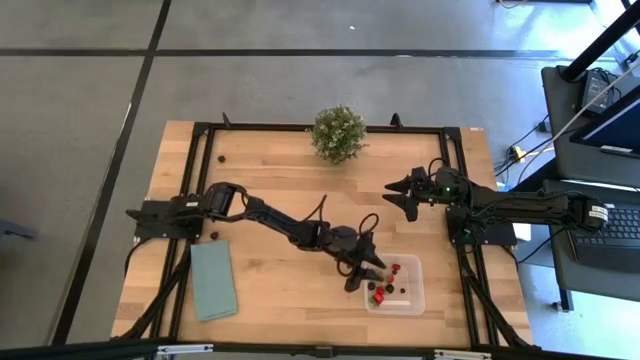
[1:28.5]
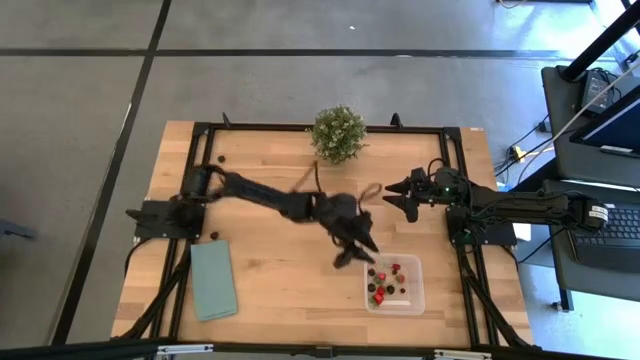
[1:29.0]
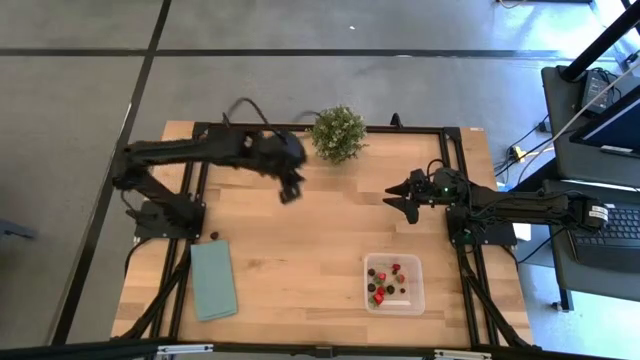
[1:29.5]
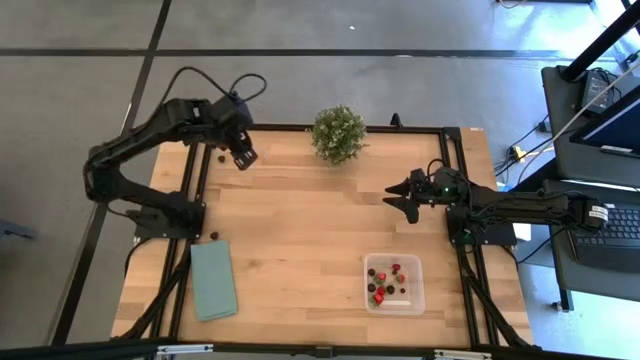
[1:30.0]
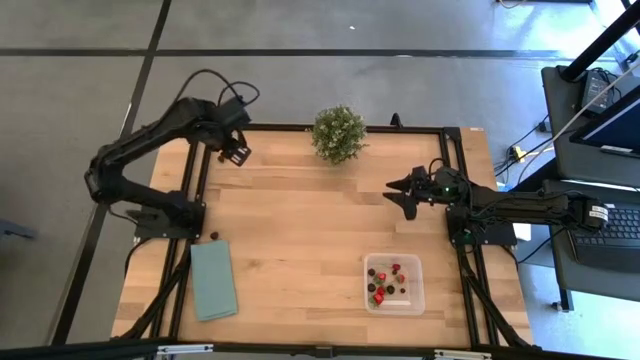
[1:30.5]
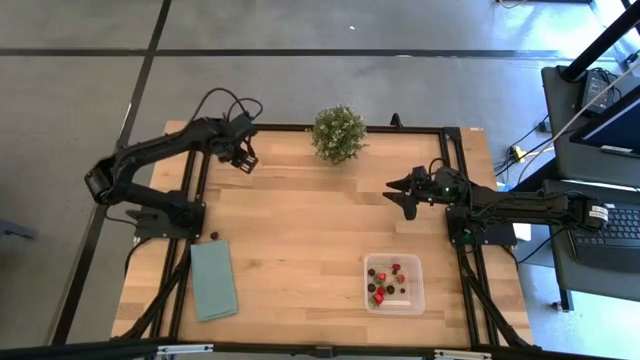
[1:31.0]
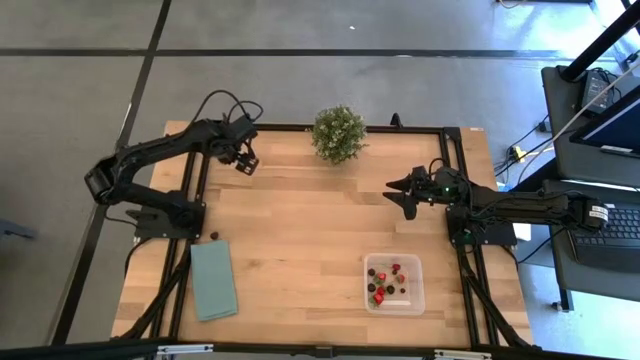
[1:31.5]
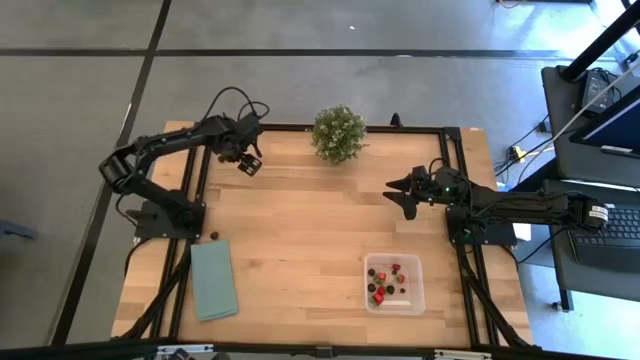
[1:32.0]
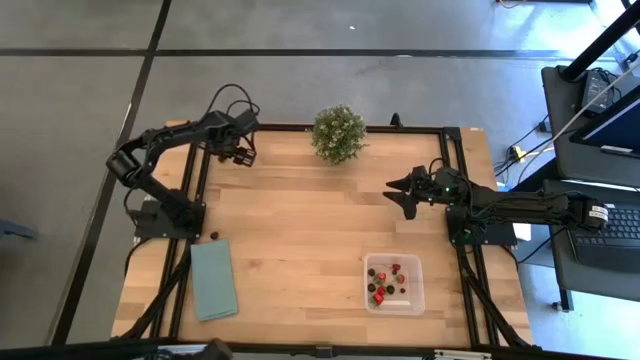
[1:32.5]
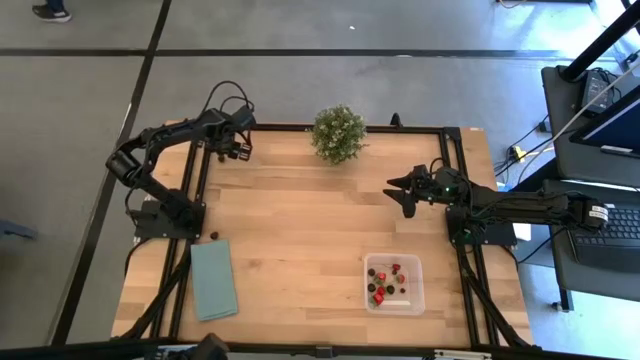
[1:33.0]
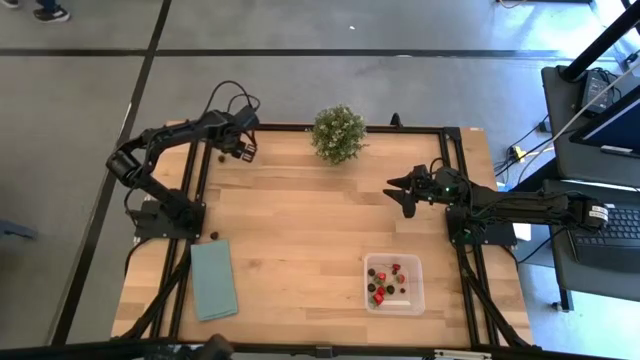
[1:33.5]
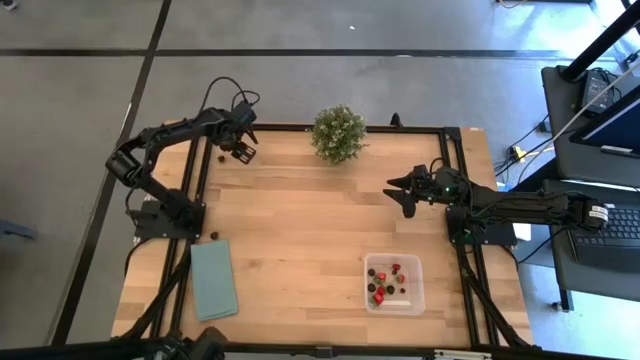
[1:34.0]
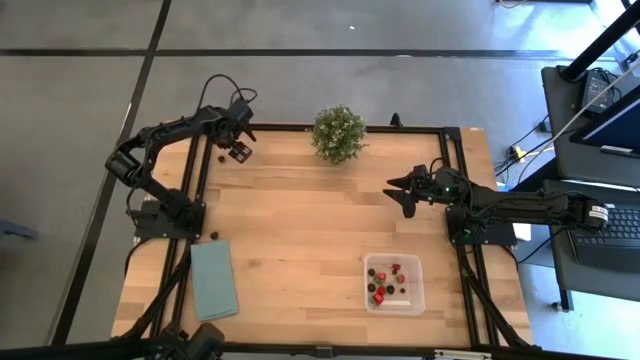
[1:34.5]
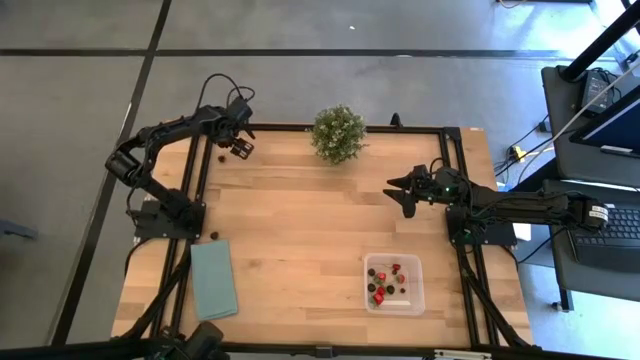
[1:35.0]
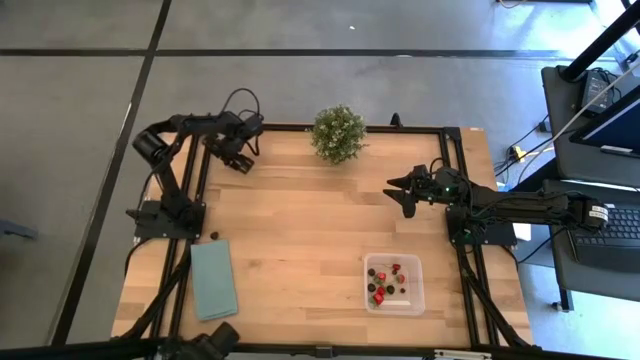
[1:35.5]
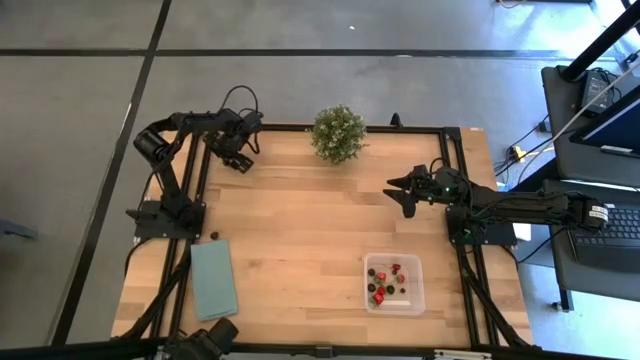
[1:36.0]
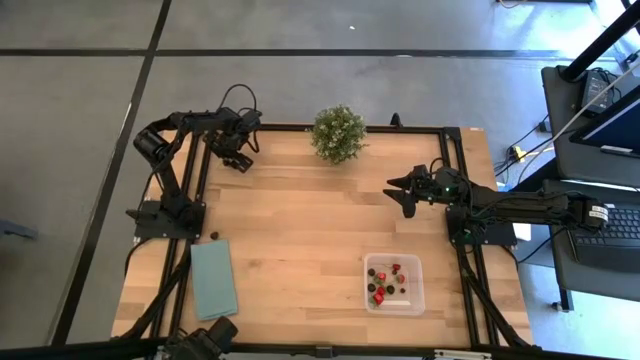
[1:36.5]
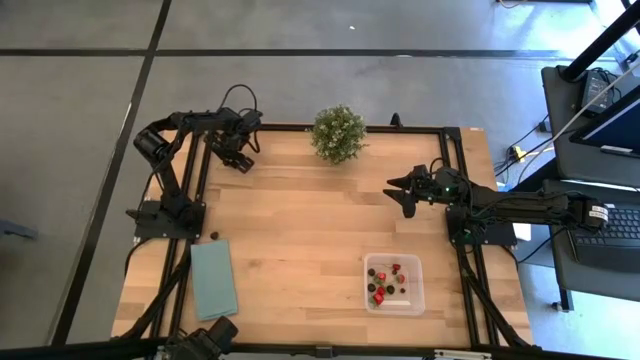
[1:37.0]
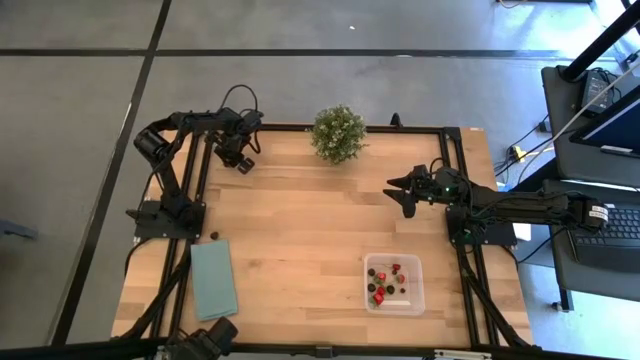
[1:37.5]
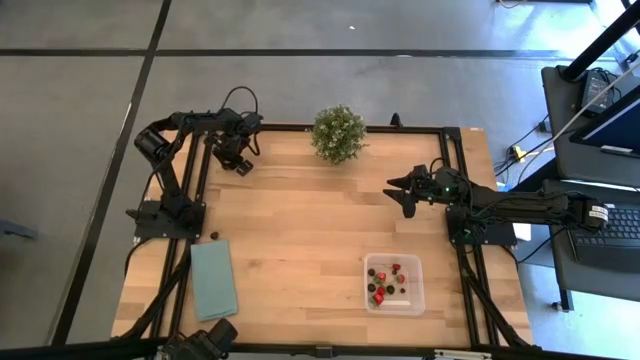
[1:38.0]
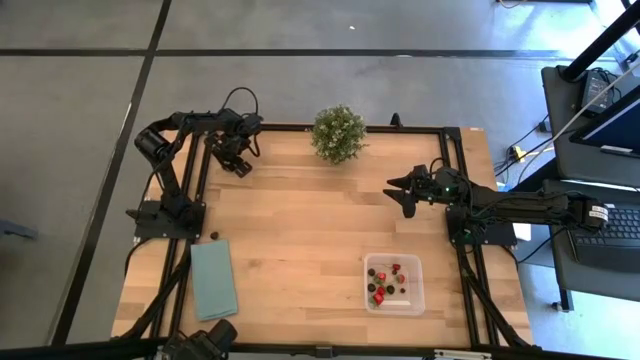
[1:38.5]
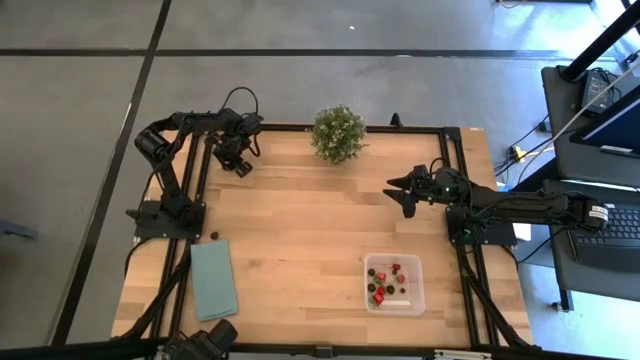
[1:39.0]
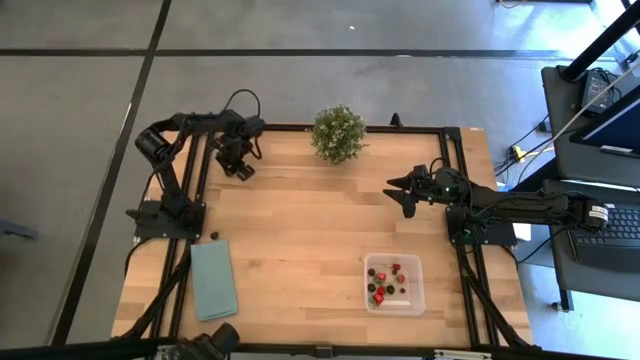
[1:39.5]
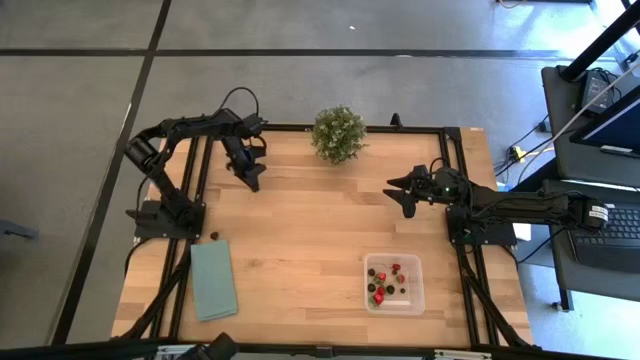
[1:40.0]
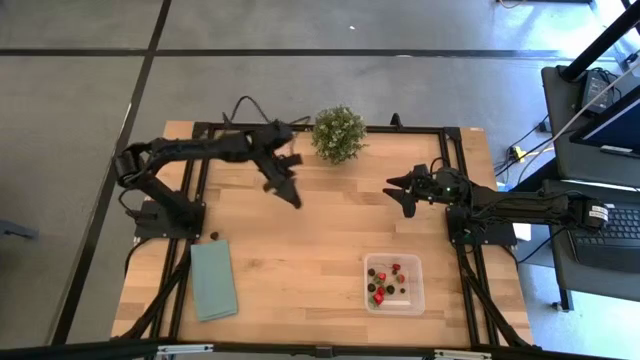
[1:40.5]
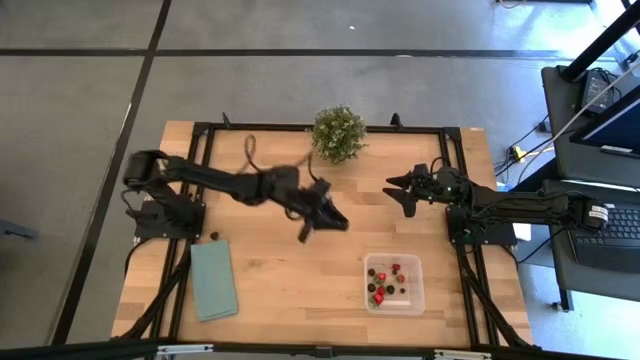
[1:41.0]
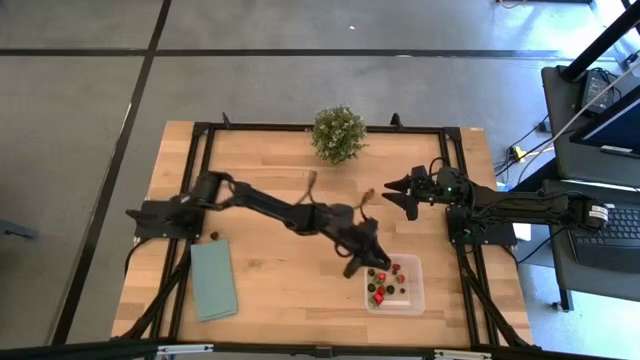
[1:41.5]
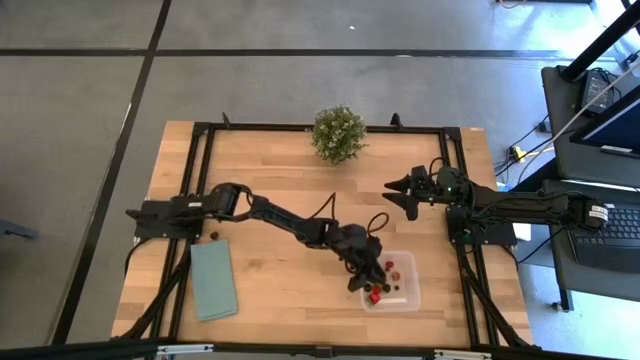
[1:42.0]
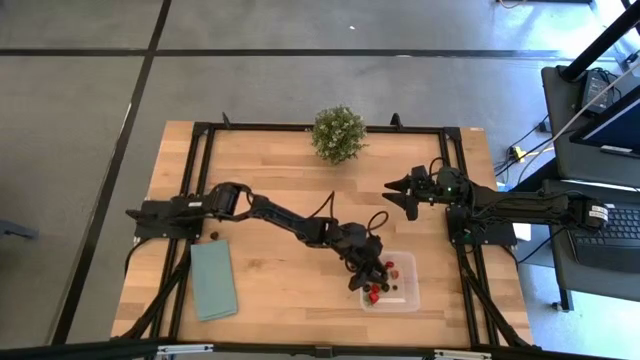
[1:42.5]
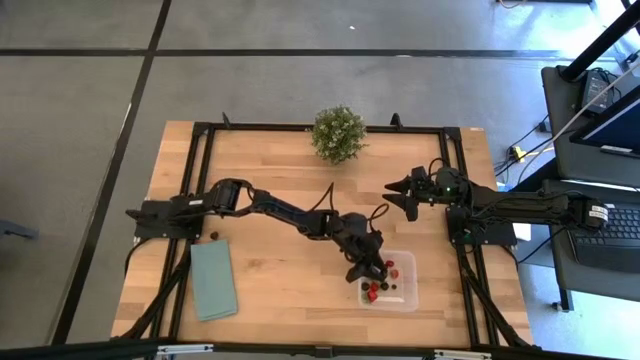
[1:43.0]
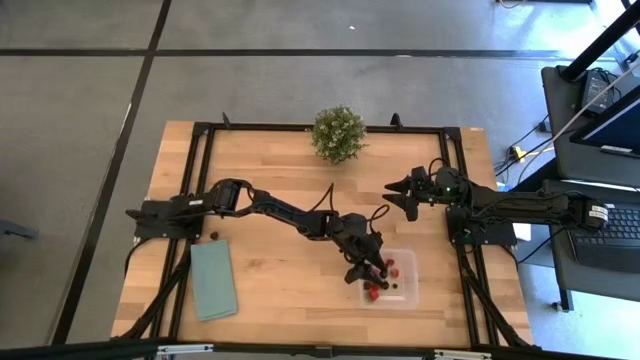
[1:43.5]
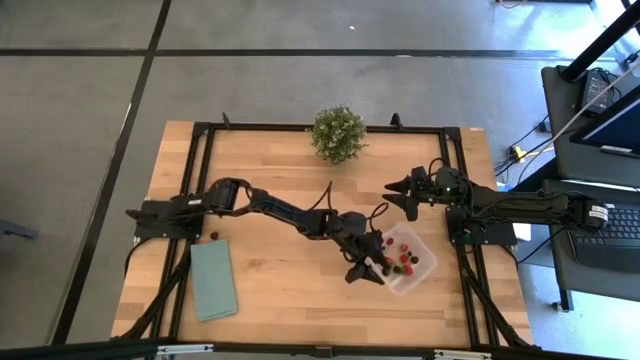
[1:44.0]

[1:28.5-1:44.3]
Task: Pick and placing Produce into tupperware
Put the black cherry into the bin

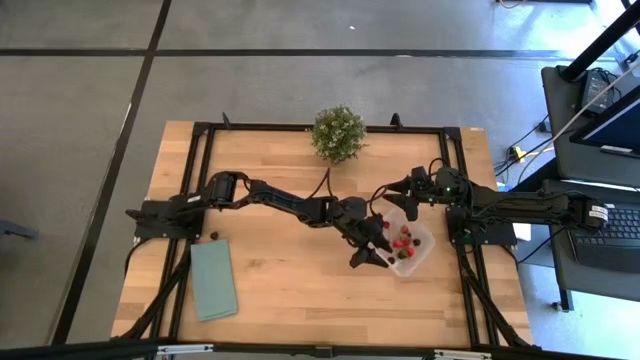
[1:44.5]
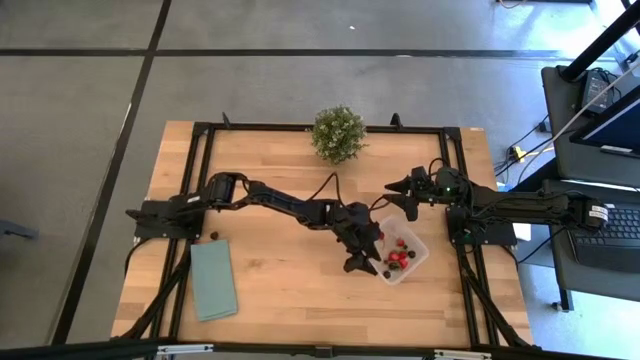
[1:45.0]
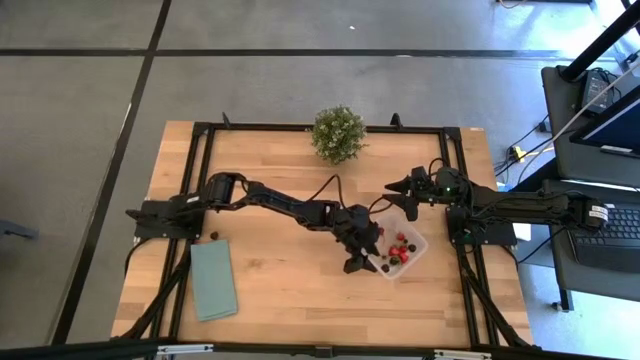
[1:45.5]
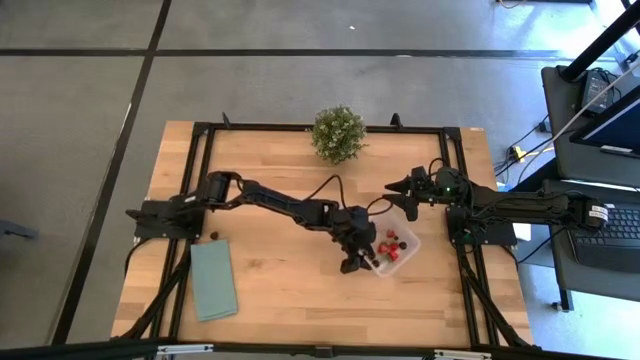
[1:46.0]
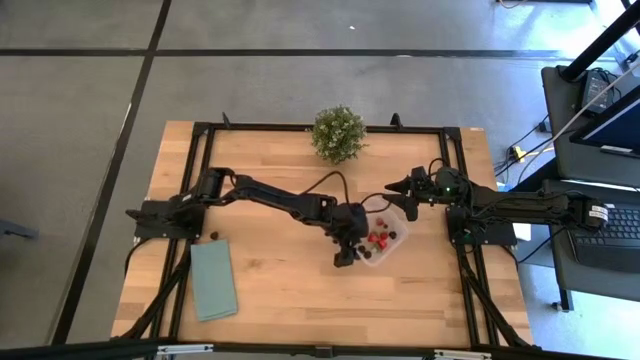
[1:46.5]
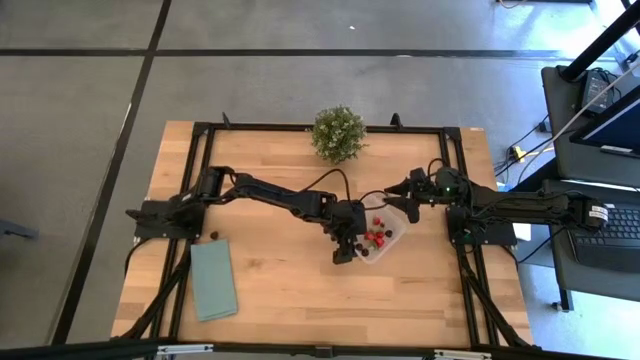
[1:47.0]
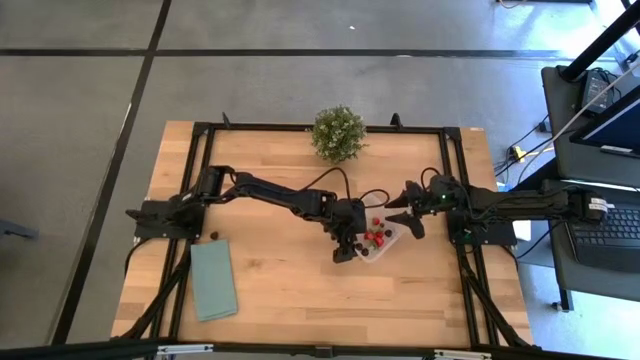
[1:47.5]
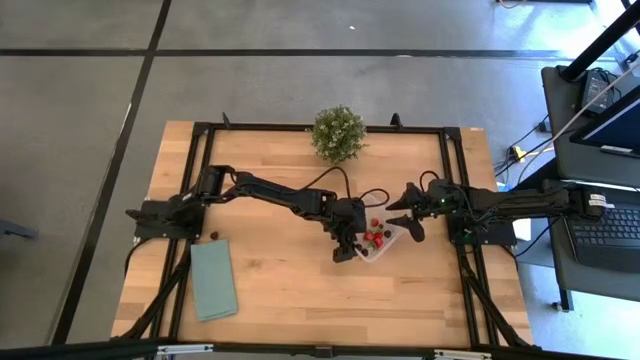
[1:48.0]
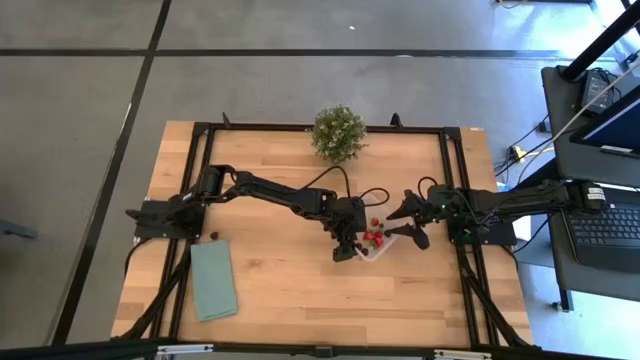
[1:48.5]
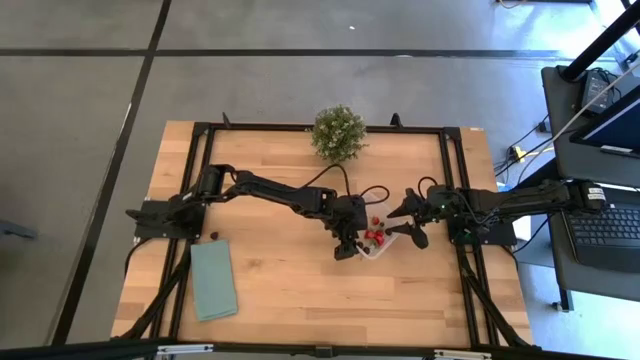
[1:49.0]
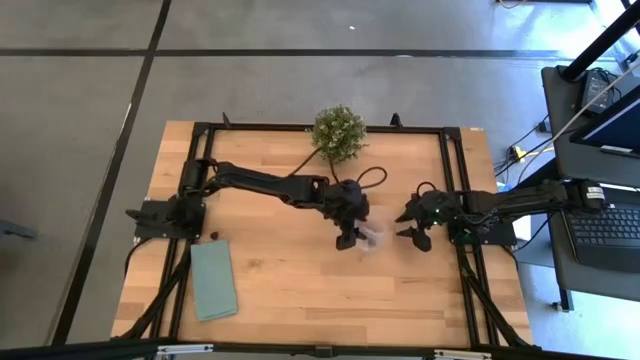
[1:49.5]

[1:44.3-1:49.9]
Adjust the bin on the table

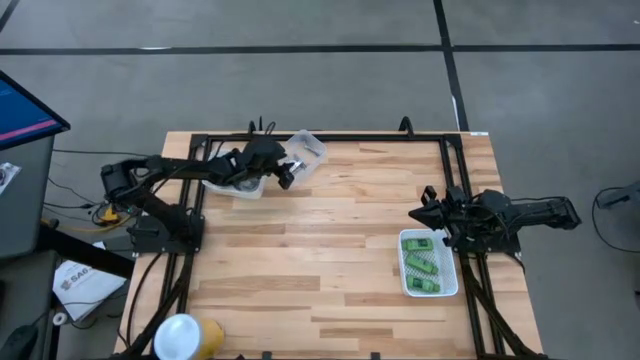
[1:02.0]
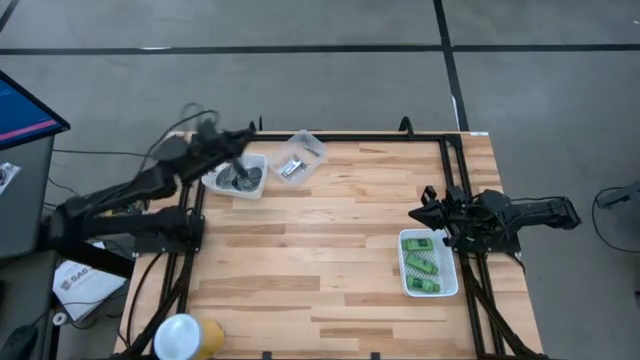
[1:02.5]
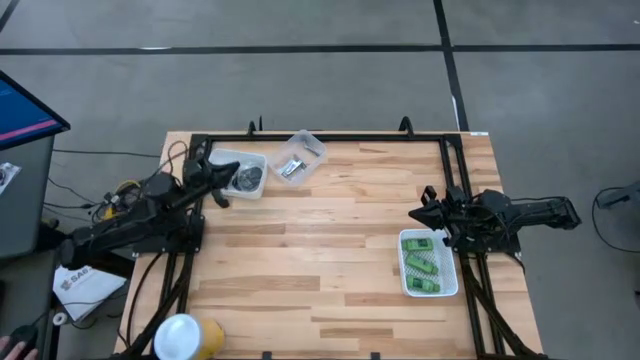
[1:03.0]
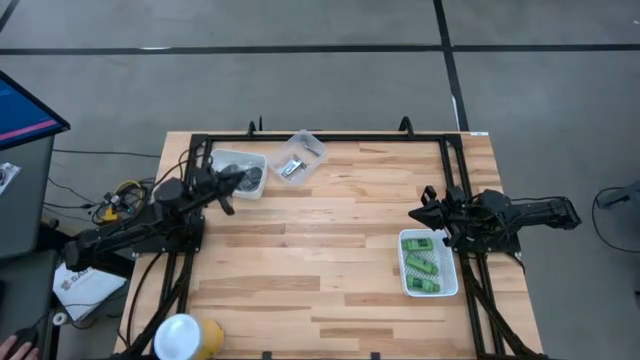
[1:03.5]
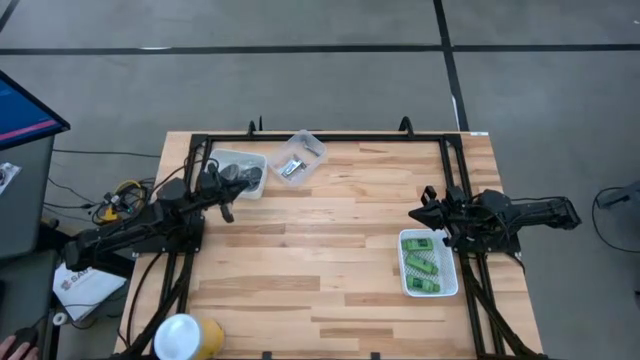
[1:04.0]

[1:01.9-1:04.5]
Task: Pick & Place Travel size toiletries
Return to Home Position
